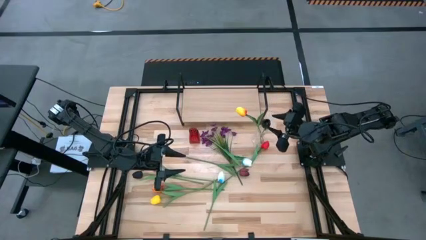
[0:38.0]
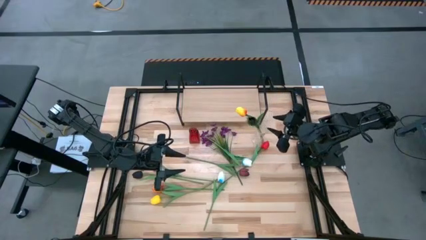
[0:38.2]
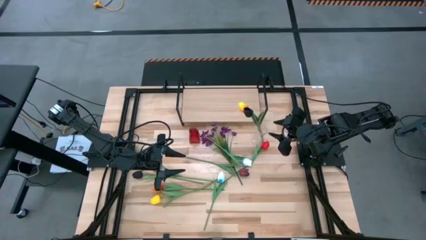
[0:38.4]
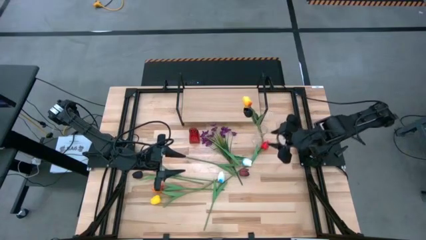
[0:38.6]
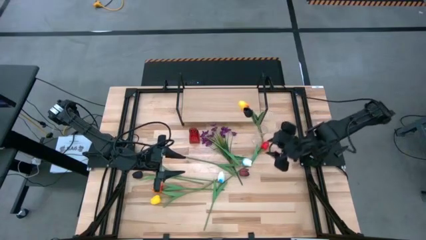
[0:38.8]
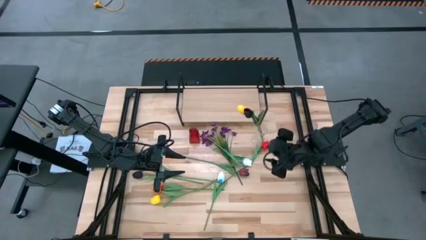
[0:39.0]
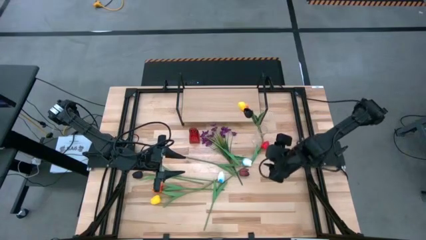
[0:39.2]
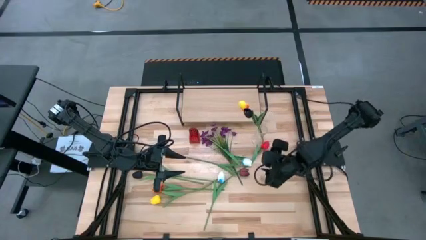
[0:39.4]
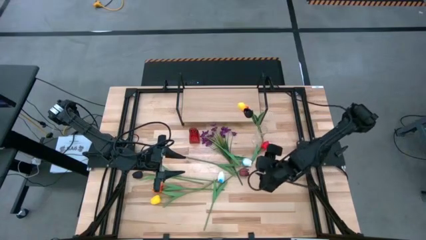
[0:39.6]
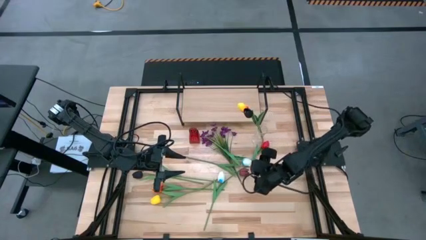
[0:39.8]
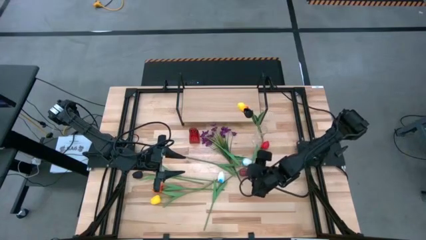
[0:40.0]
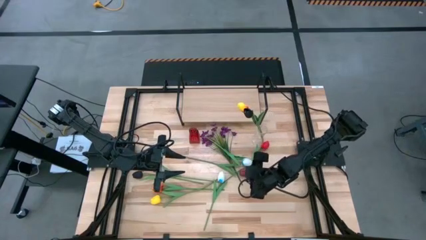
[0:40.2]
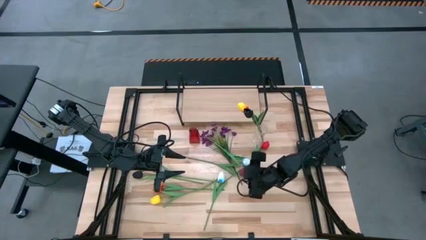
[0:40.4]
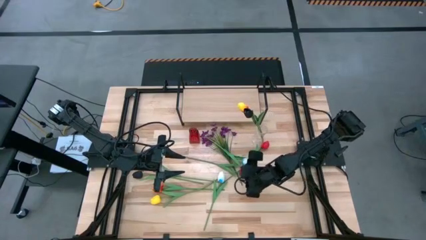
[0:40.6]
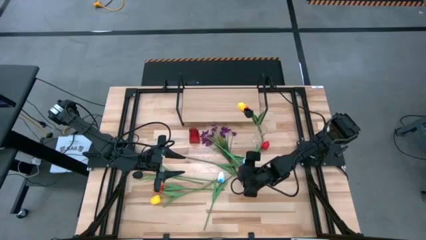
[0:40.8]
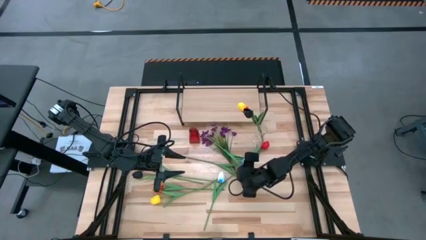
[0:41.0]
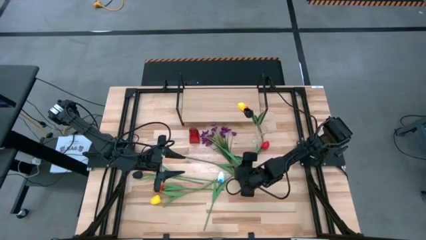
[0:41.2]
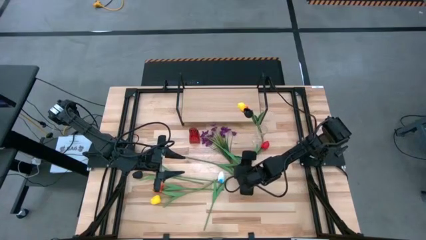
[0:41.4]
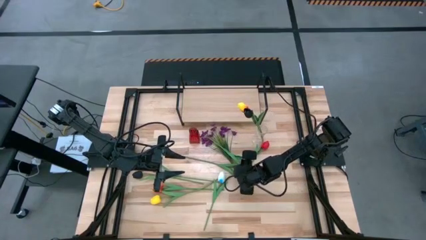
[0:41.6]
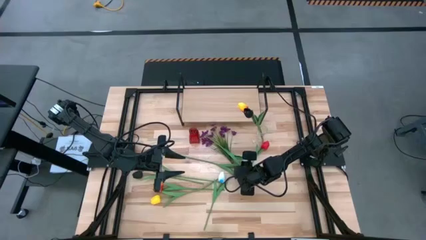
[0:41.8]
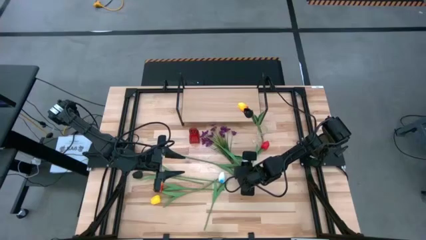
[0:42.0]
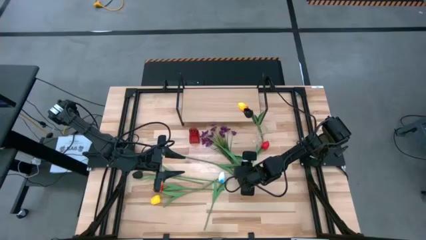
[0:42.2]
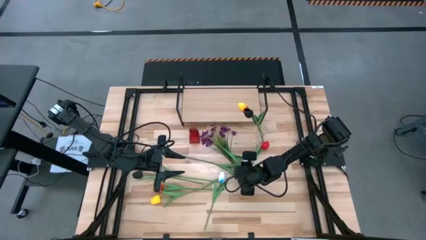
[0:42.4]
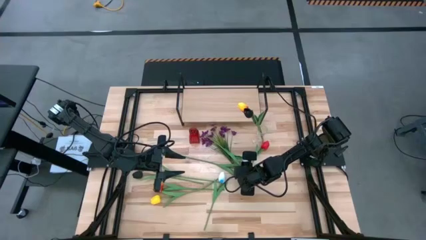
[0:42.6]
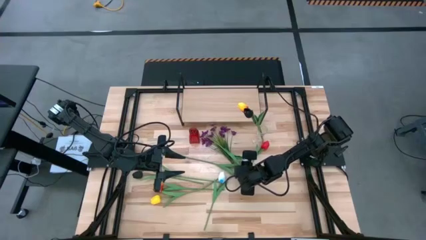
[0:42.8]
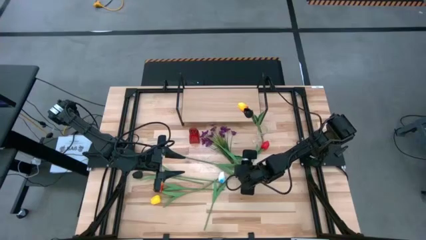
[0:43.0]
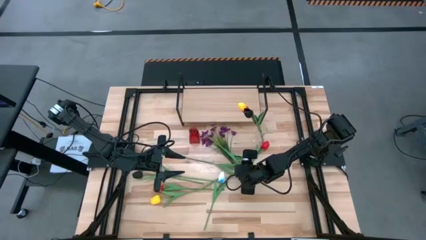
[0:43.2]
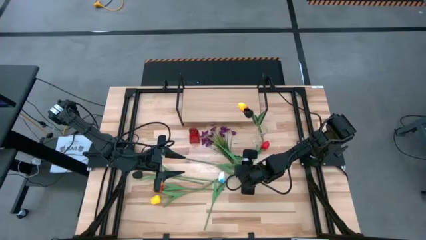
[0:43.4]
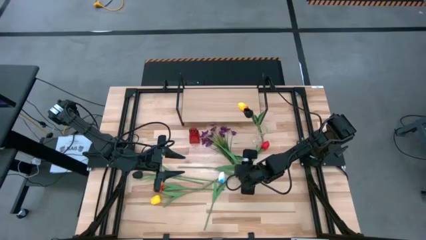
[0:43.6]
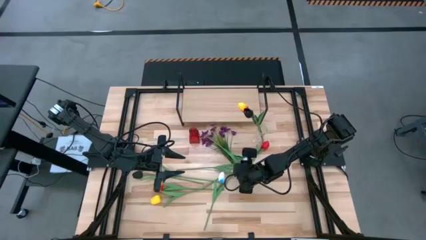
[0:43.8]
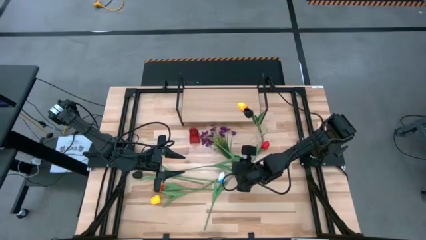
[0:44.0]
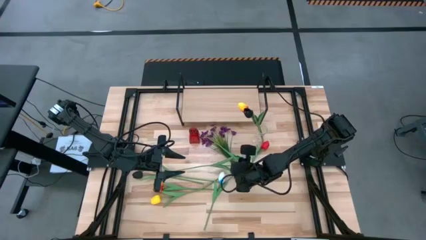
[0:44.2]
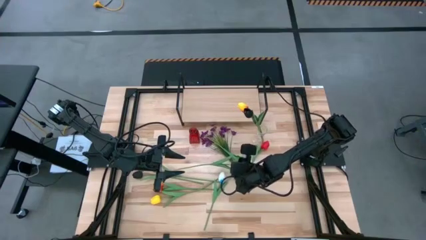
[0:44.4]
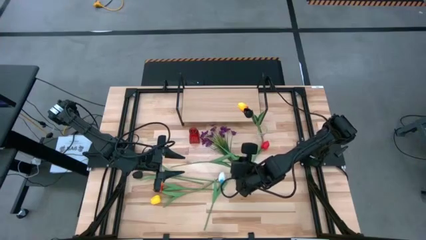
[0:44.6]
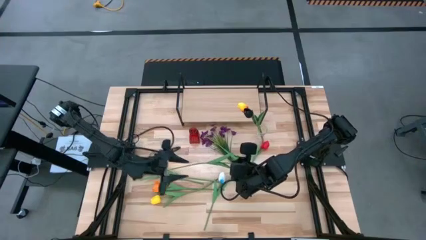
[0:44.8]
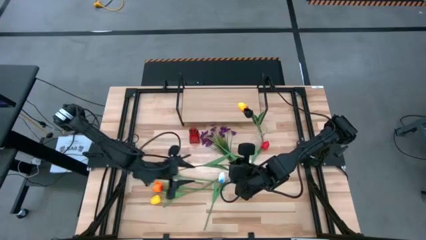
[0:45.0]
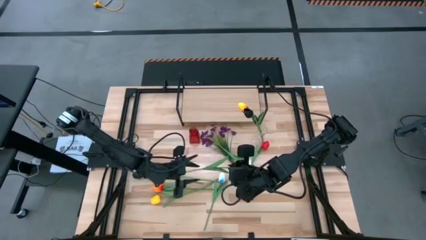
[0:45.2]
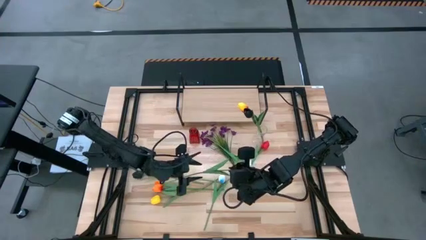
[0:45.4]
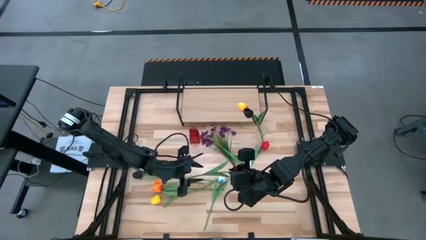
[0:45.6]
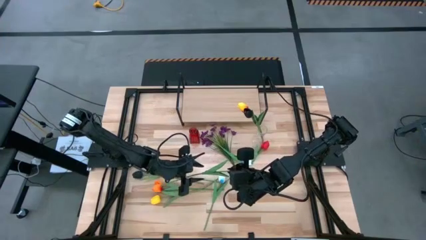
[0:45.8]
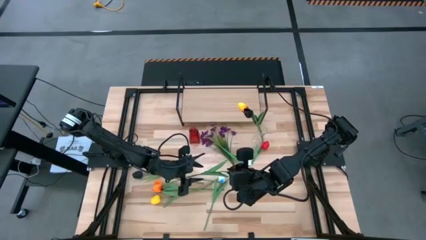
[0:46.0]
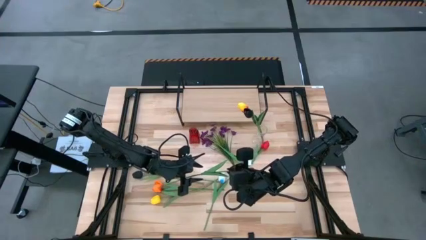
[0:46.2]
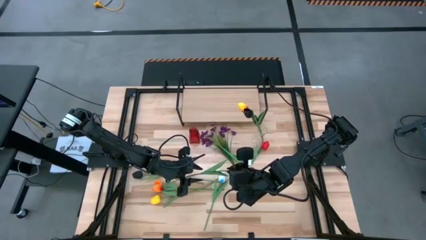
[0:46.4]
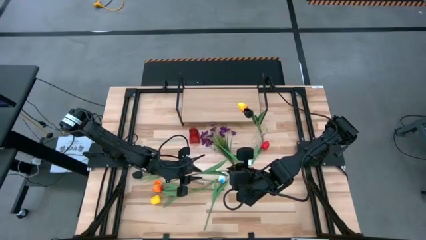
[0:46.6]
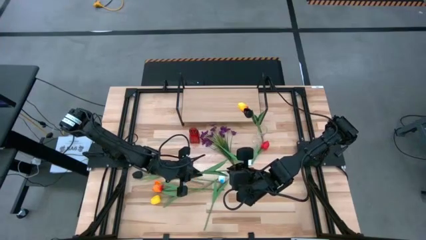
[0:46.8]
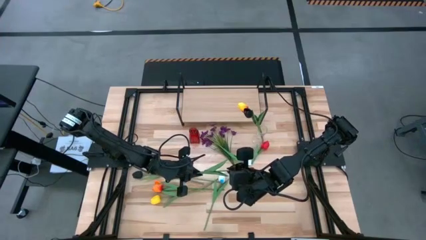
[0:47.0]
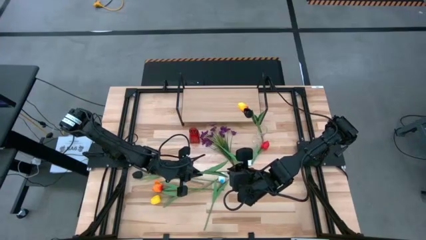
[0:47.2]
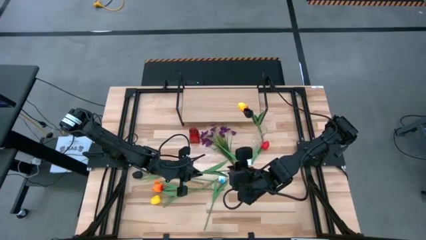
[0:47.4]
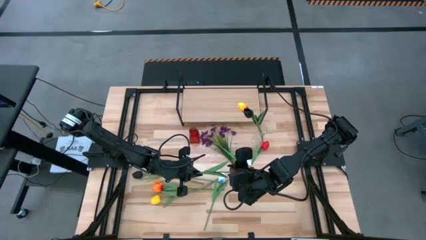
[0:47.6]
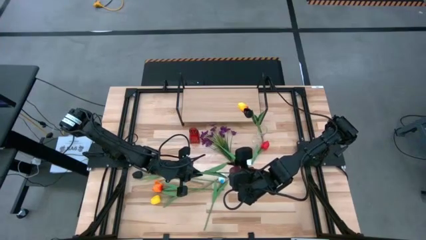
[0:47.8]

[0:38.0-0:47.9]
Task: Pick and place flowers into a vace then onto a shelf
Put the dark red flower into the transparent vase

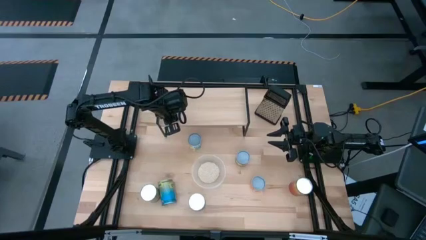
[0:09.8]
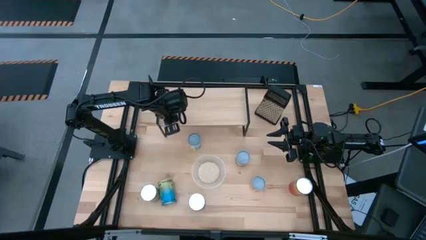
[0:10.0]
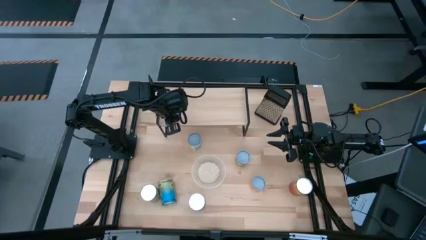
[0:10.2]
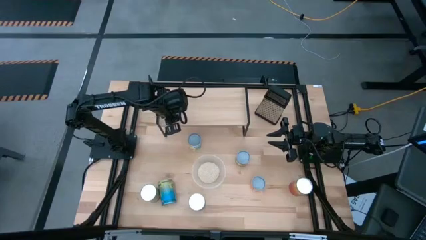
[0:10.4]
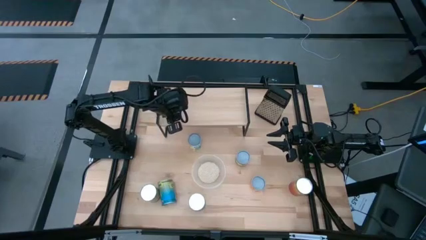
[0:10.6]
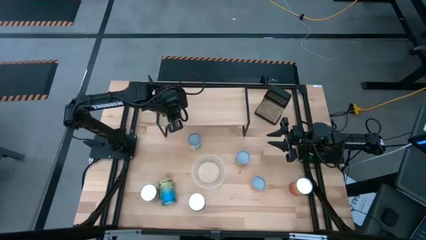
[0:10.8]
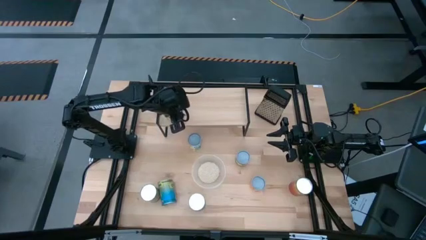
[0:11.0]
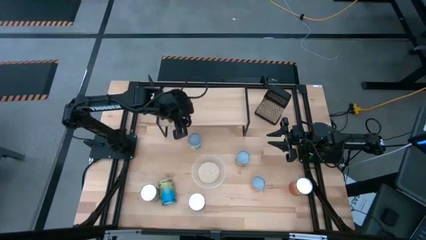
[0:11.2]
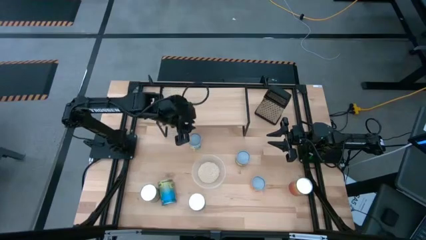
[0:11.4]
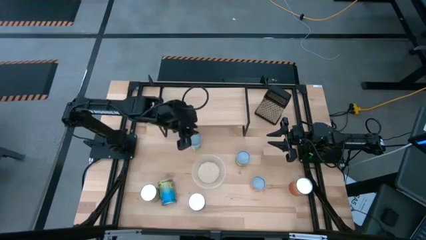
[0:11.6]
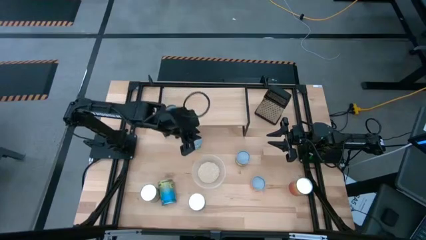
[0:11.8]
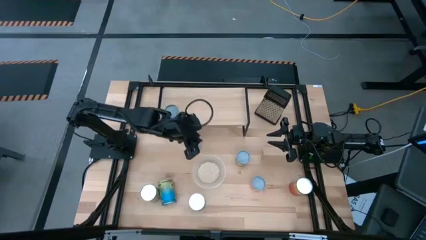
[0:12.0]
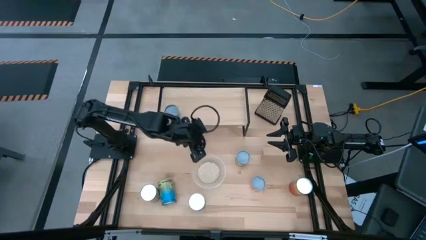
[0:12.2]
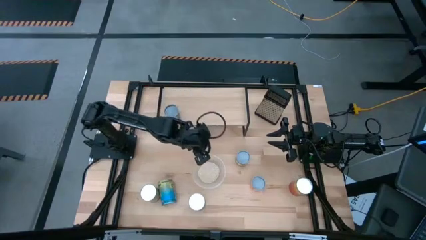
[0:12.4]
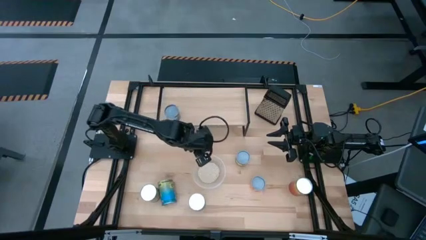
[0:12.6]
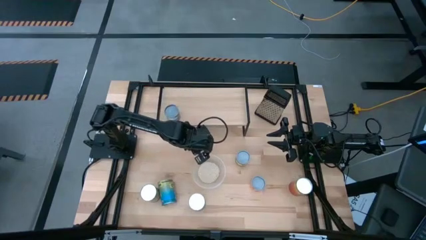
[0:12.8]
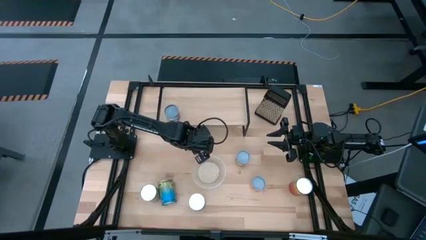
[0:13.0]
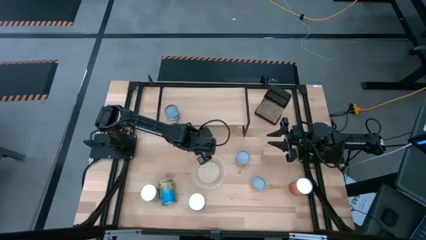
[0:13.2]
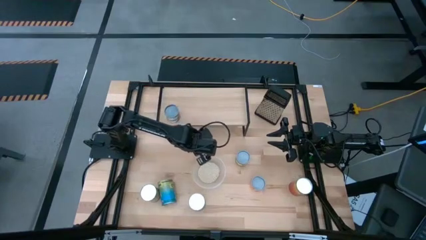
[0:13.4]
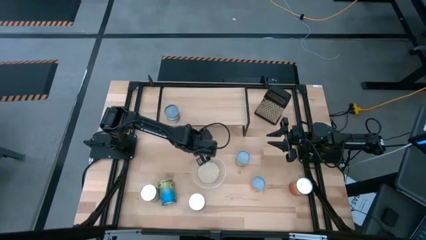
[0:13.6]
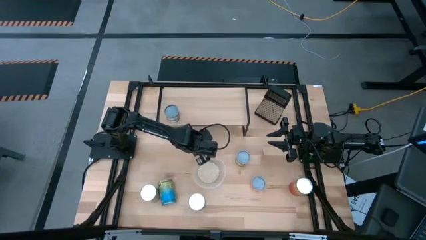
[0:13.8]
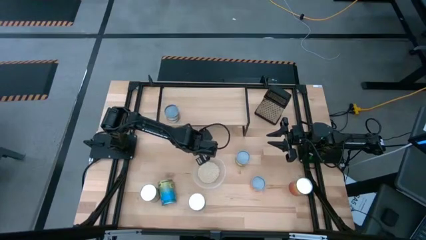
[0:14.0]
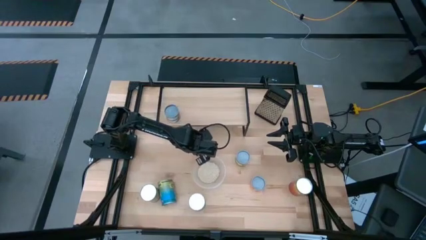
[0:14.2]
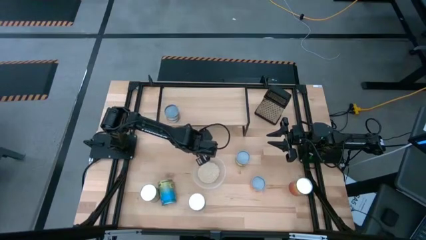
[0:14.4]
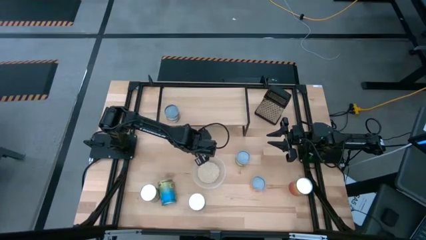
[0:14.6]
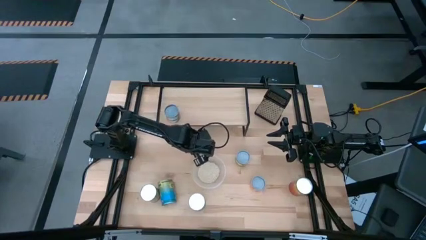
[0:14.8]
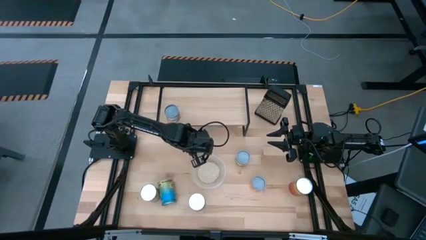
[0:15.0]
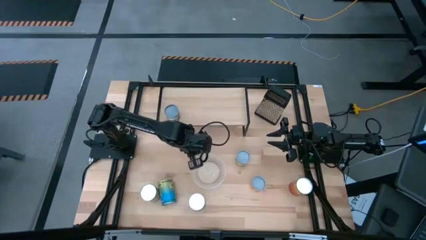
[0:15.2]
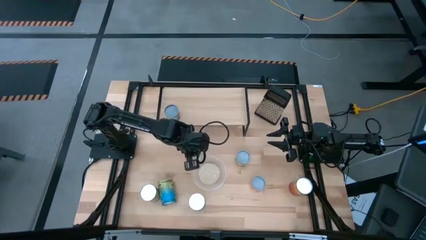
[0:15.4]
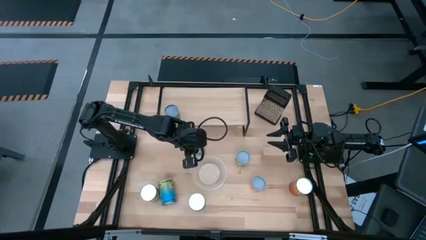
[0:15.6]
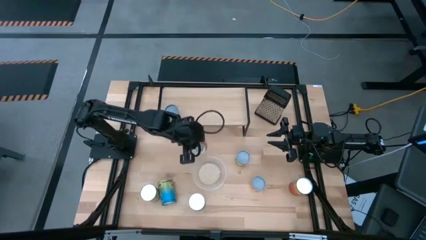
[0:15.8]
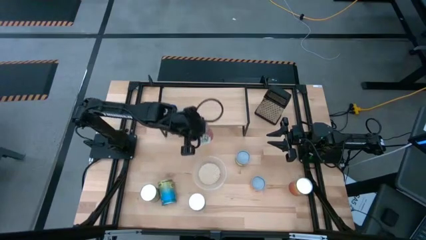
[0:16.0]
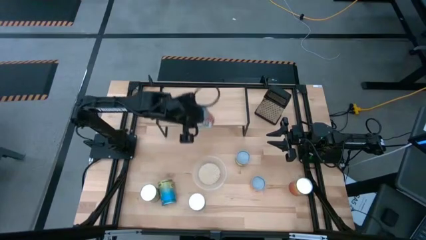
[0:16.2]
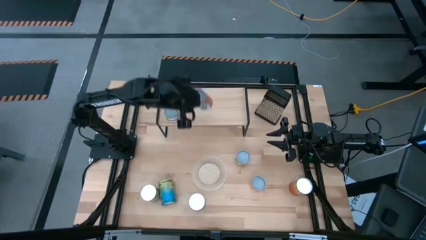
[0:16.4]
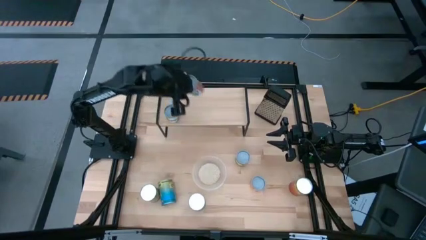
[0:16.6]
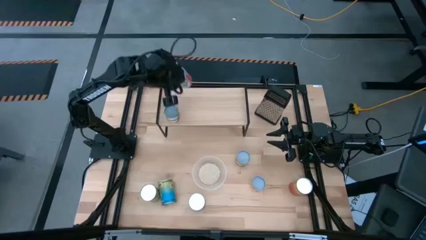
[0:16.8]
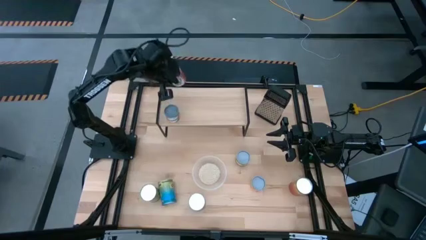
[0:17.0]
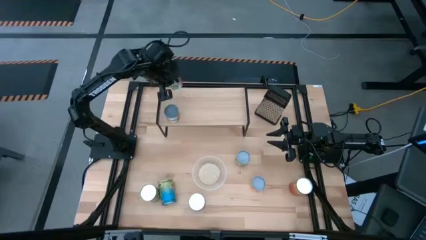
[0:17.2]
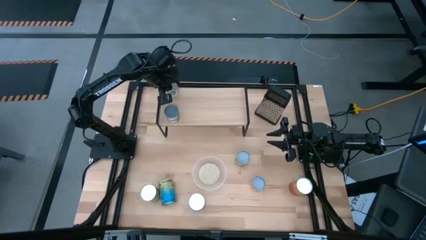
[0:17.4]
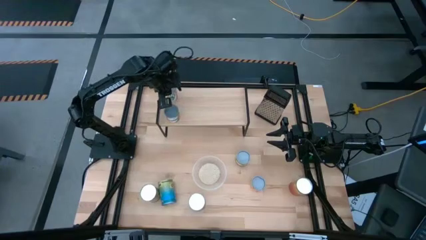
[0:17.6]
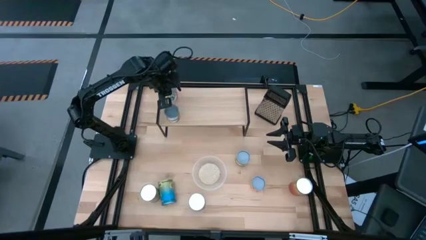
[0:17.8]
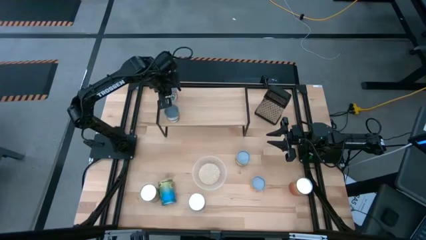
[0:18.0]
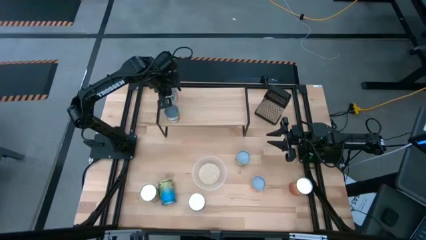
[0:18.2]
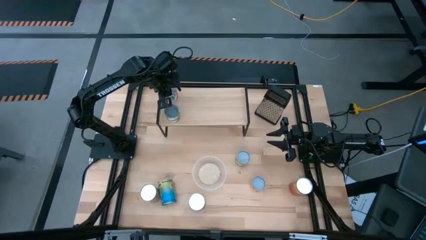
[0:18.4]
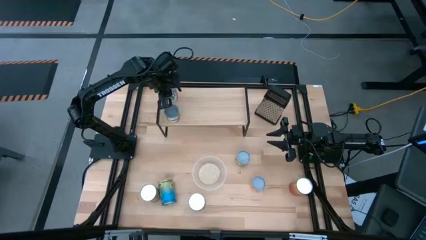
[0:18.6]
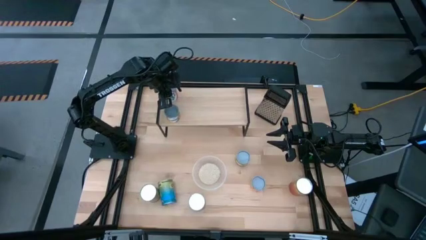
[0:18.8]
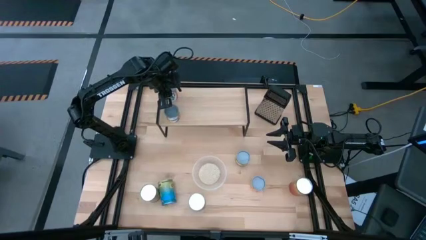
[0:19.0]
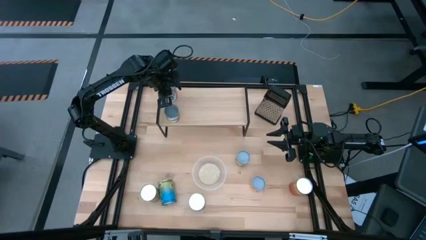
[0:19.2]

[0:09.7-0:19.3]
Task: Pick and place cans onto a shelf
Put the canned mixed fruit on the shelf
